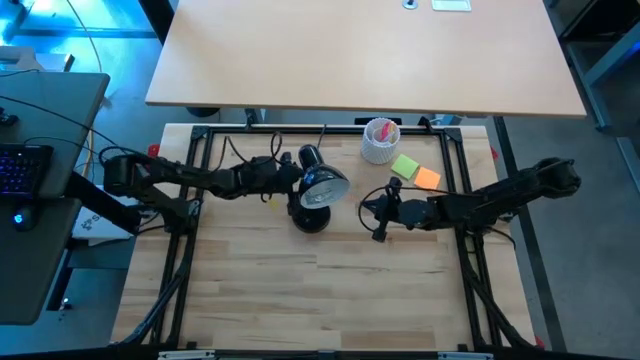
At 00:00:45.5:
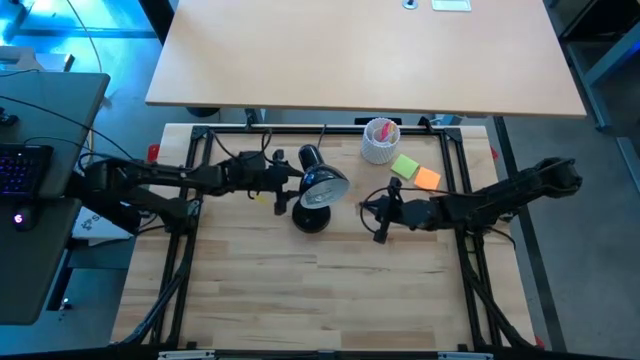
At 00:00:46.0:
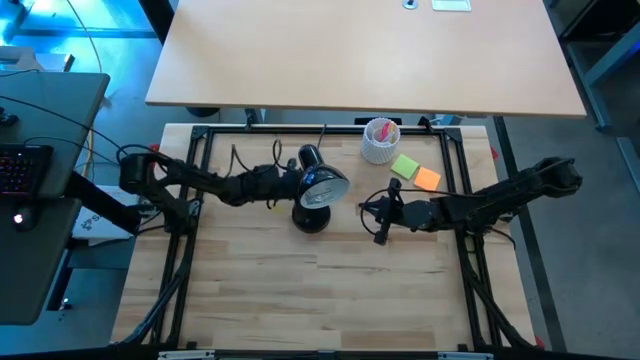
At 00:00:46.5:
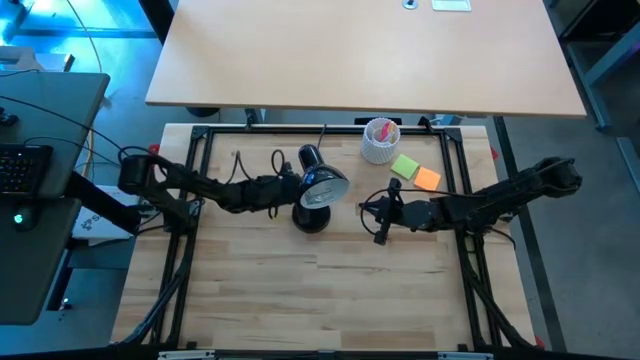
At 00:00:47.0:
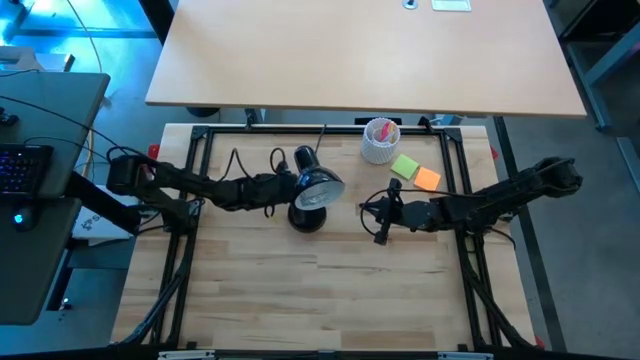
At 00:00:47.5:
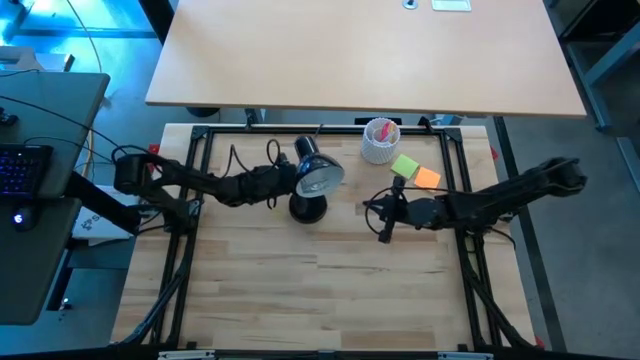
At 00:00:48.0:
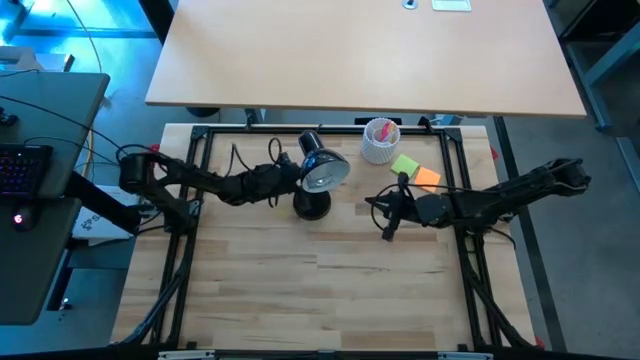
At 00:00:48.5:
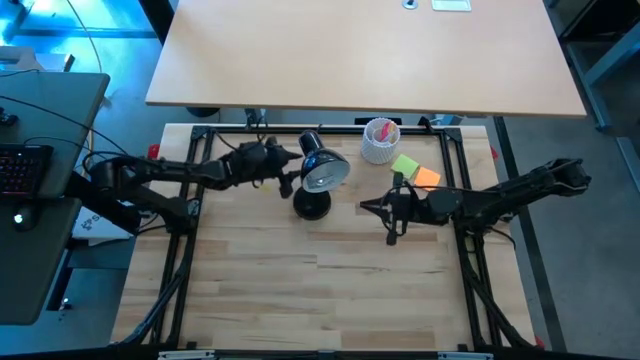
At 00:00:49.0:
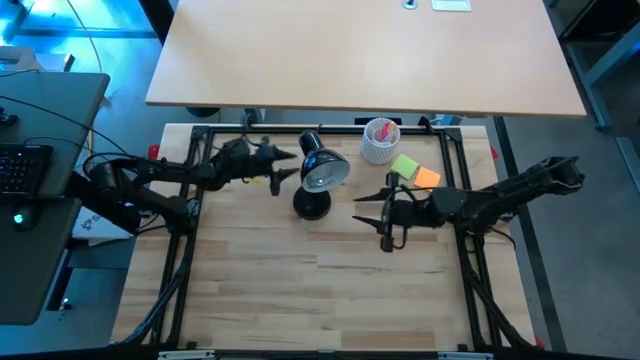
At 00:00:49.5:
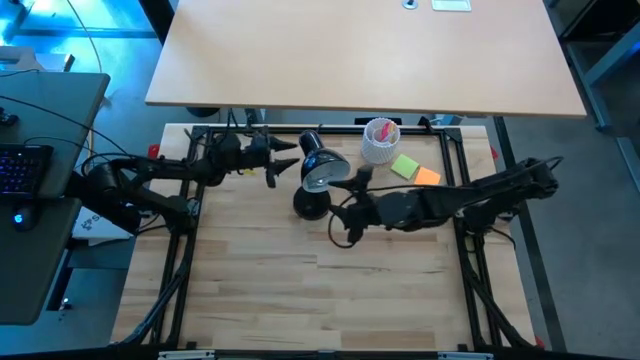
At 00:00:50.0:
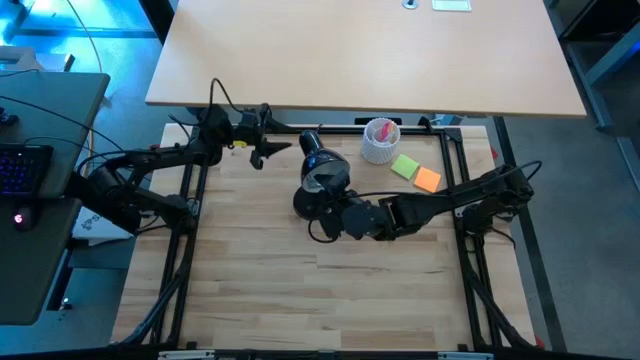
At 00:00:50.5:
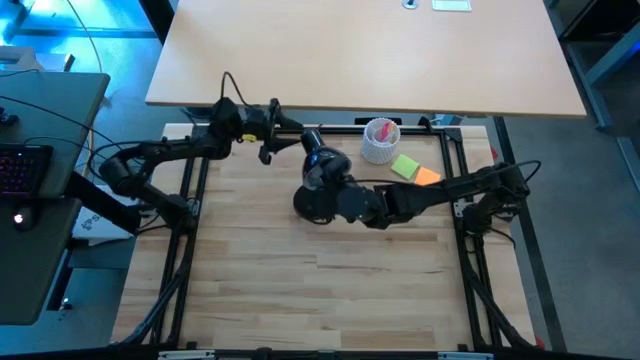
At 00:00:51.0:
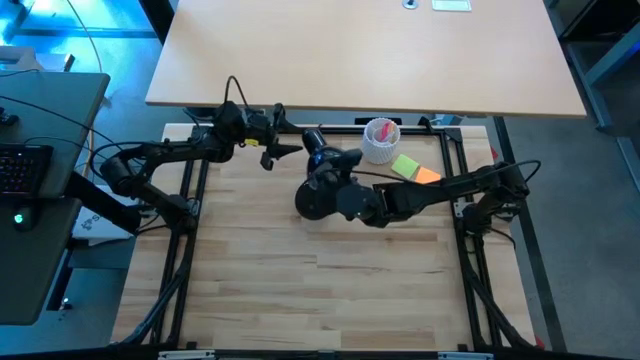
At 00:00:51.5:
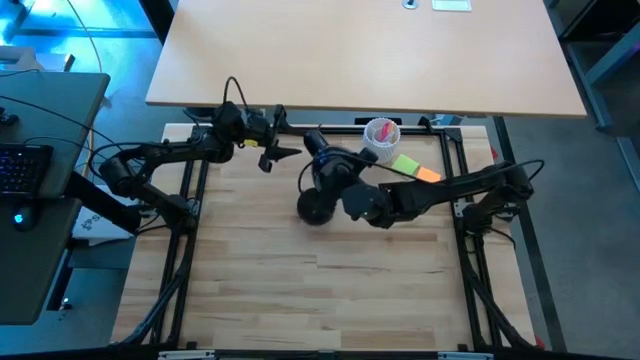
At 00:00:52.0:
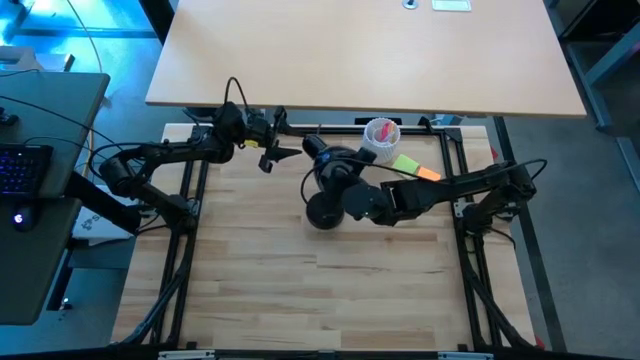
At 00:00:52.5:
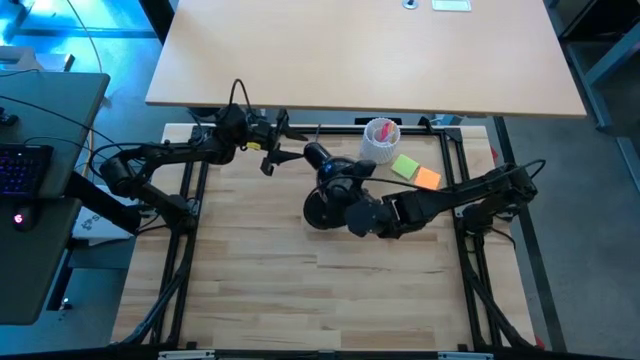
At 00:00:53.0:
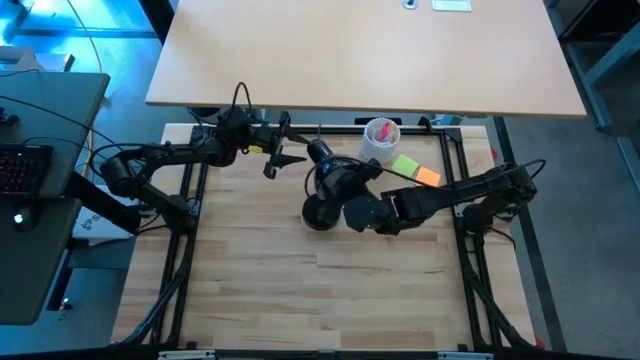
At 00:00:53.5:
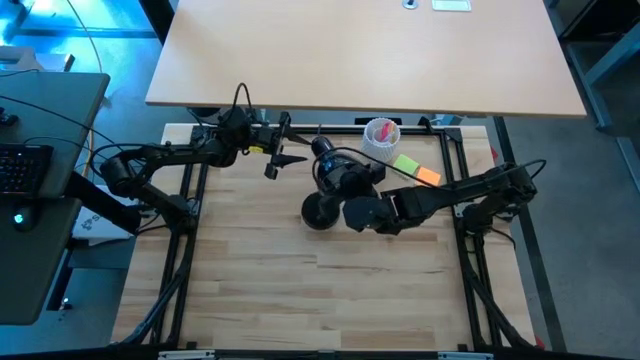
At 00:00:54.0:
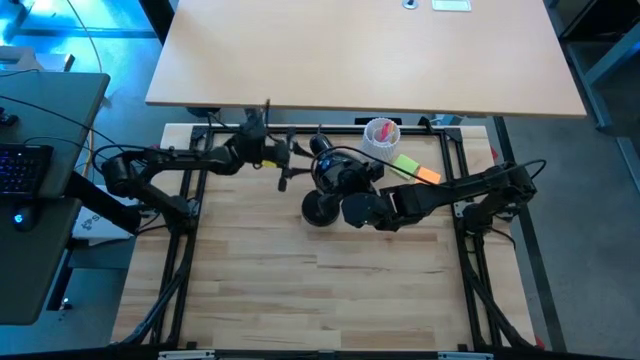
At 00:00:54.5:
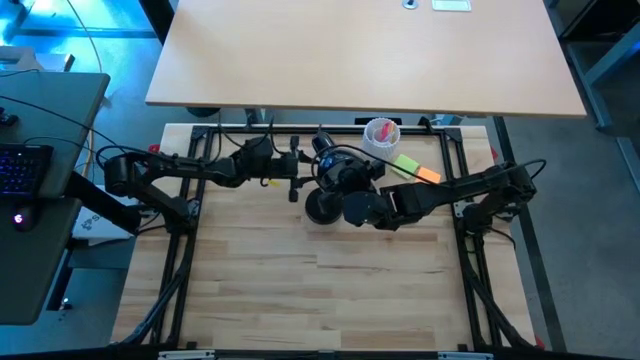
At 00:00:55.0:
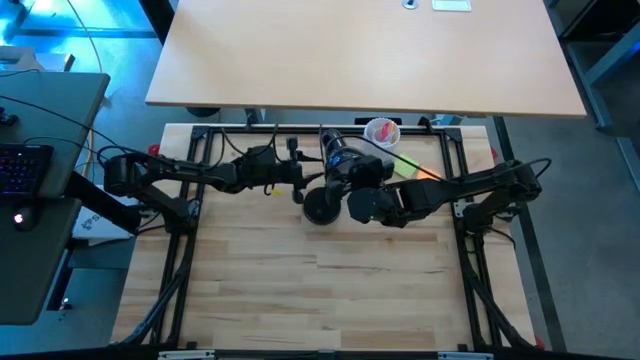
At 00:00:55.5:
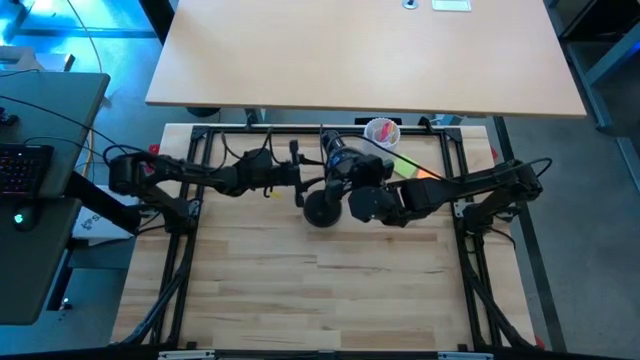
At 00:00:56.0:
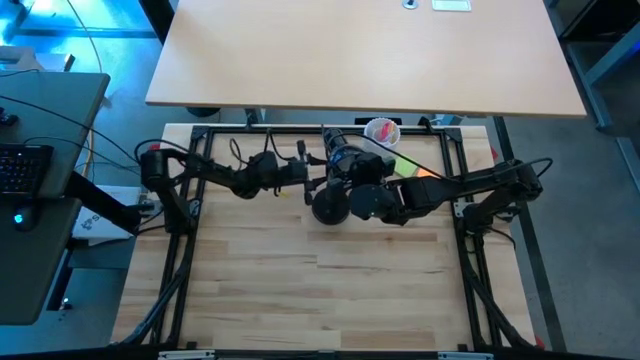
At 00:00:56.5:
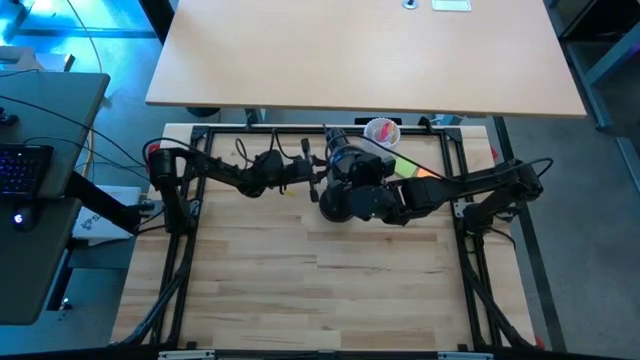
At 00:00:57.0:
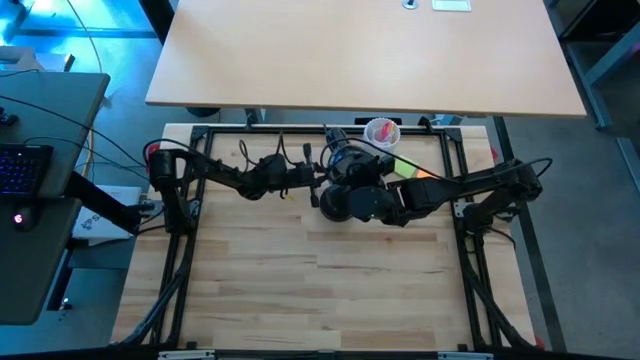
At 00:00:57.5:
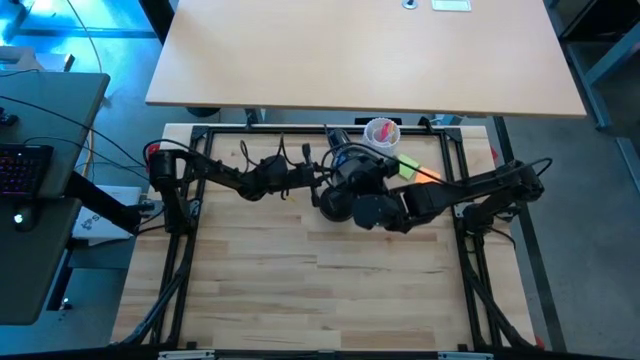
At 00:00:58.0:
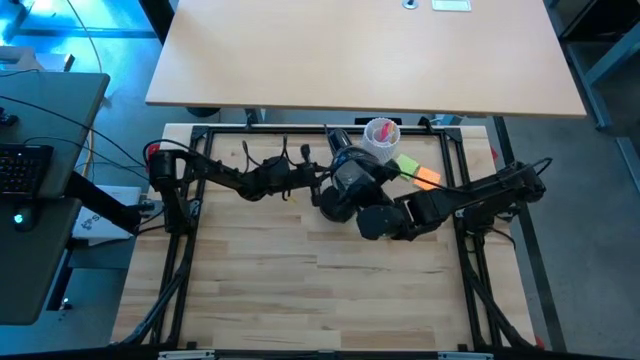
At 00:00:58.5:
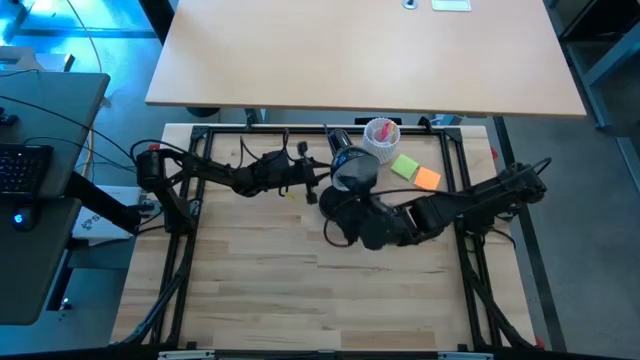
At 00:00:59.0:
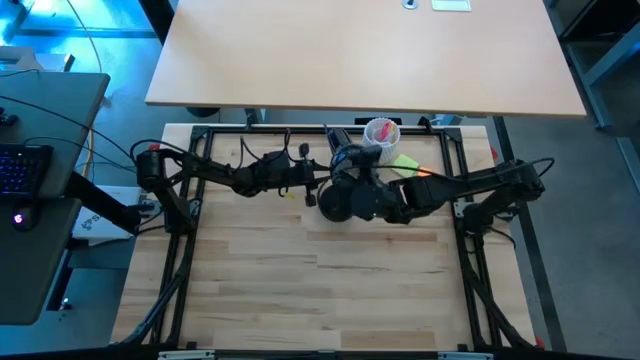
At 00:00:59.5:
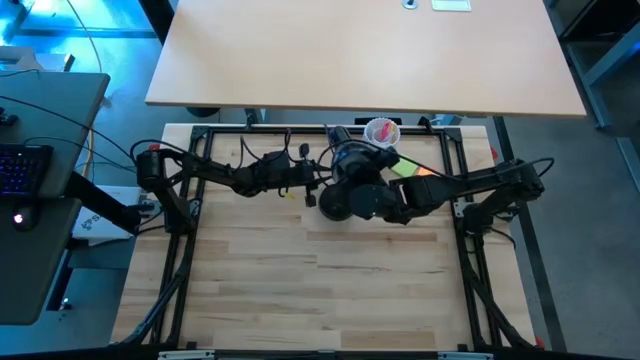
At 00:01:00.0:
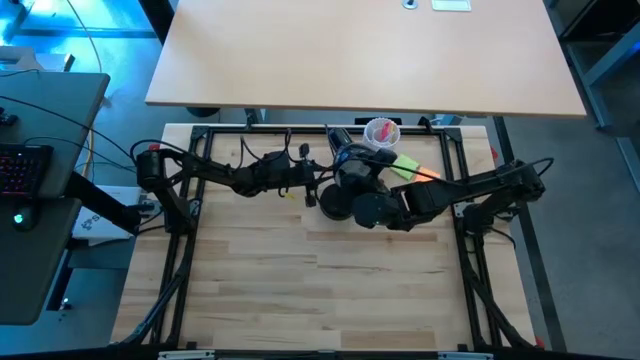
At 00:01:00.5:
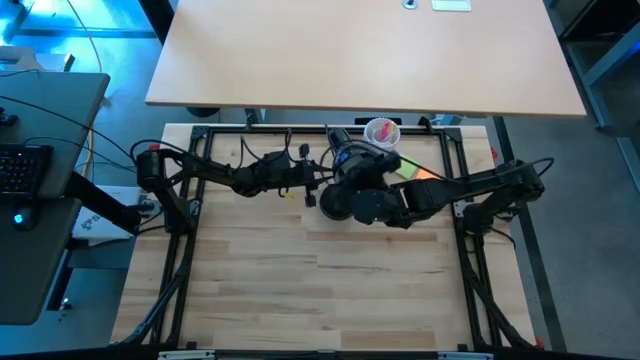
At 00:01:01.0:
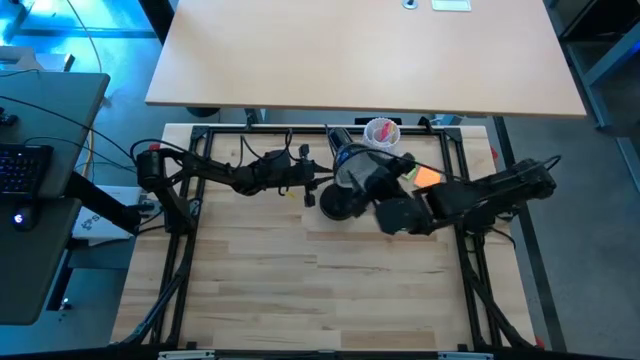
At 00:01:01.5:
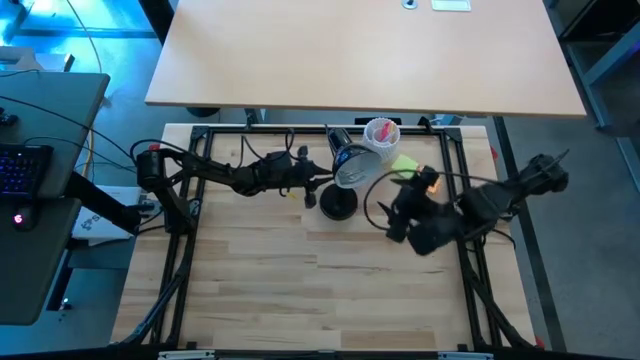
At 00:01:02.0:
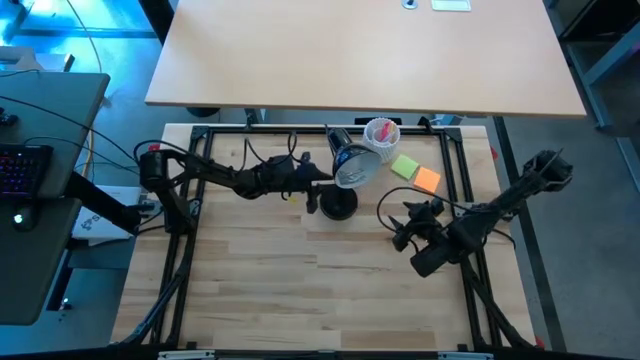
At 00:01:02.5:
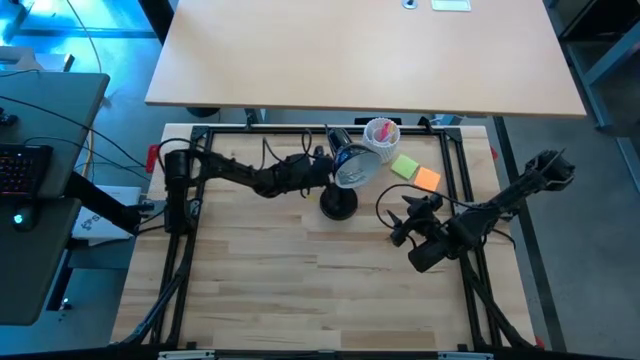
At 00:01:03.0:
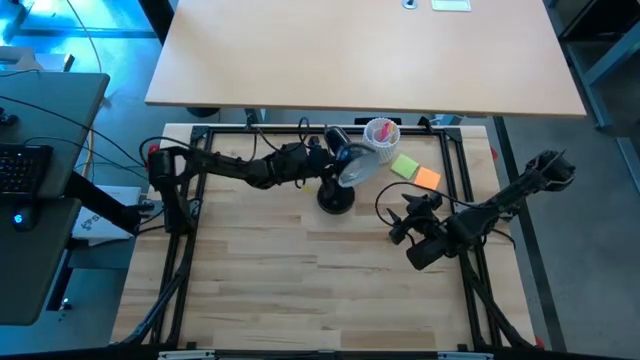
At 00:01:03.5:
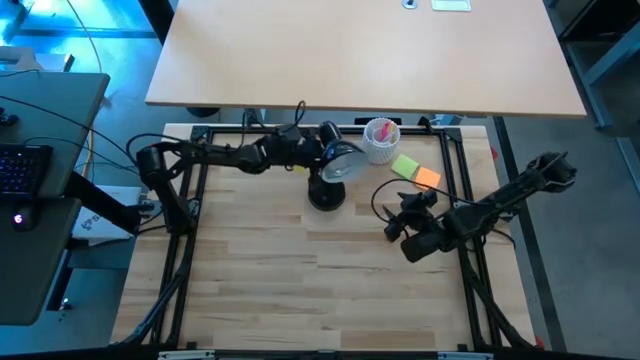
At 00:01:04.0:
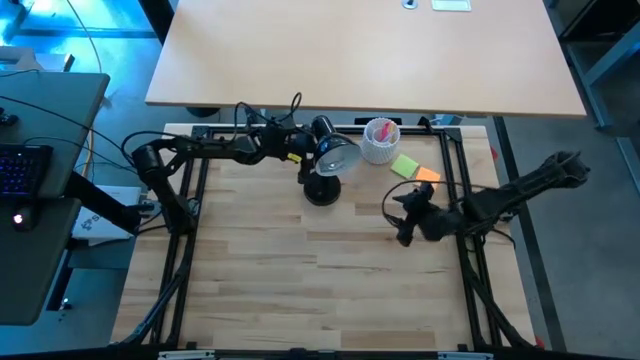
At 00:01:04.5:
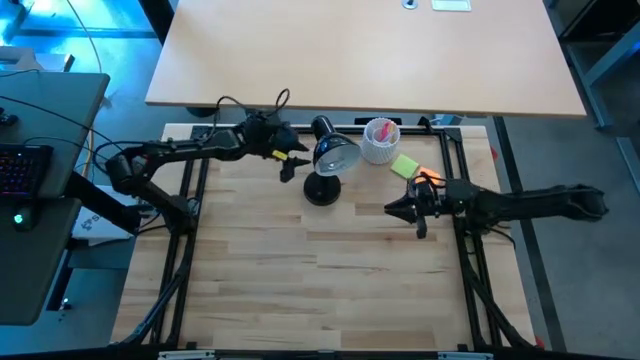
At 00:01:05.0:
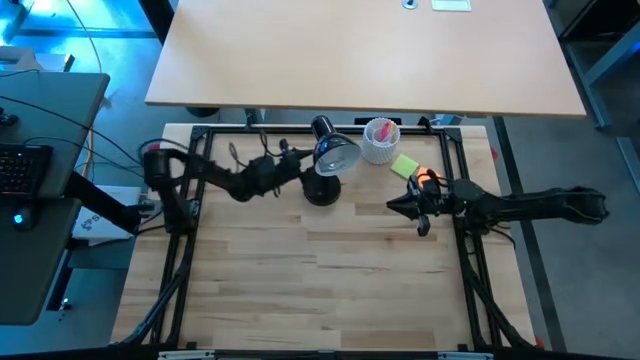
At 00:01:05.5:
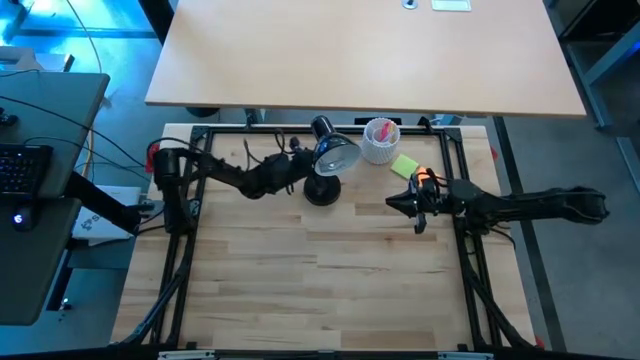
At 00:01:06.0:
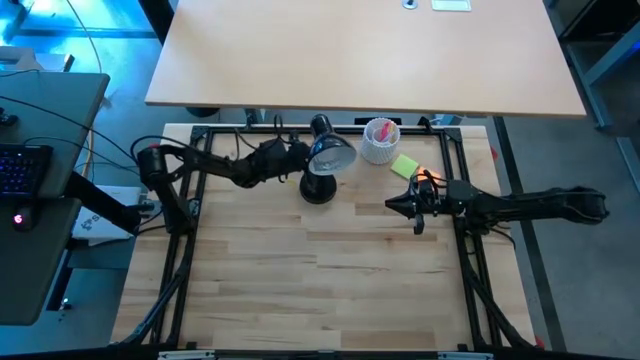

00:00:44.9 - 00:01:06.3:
Task: Screw lightbulb
Insert the lightbulb into the desk lamp
